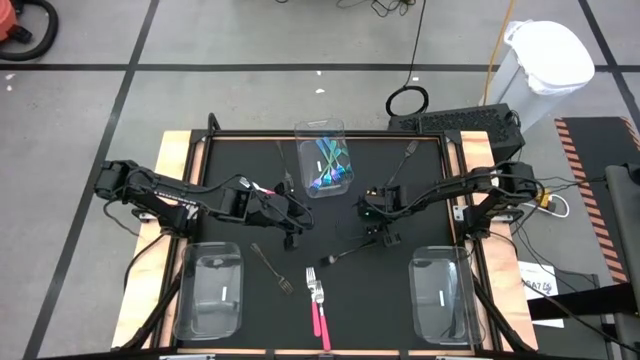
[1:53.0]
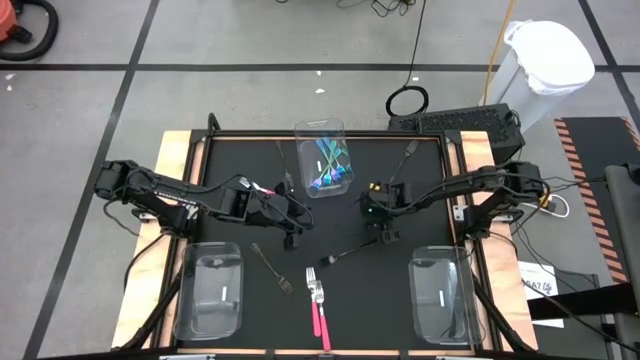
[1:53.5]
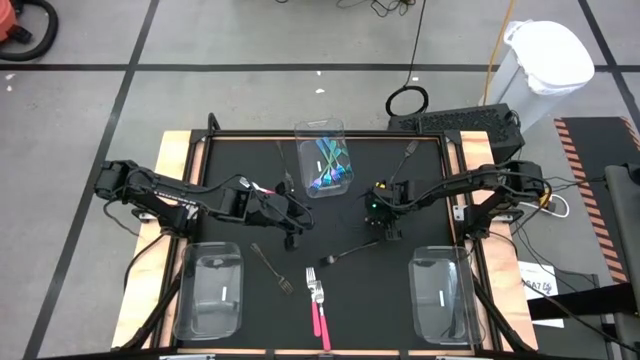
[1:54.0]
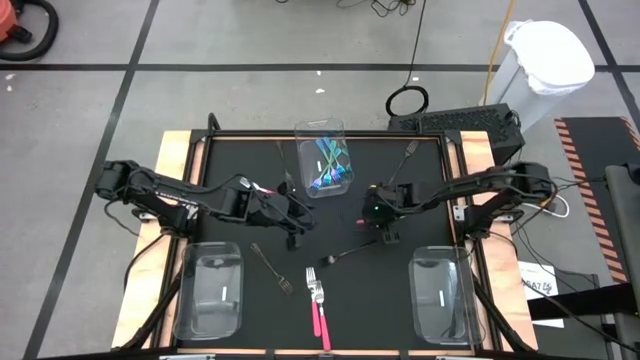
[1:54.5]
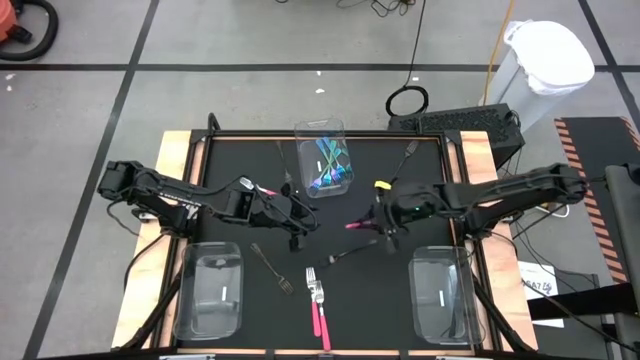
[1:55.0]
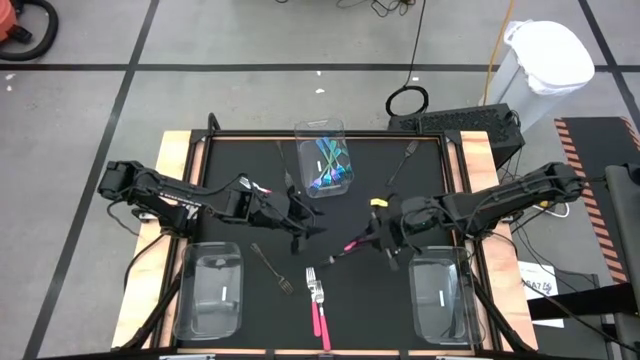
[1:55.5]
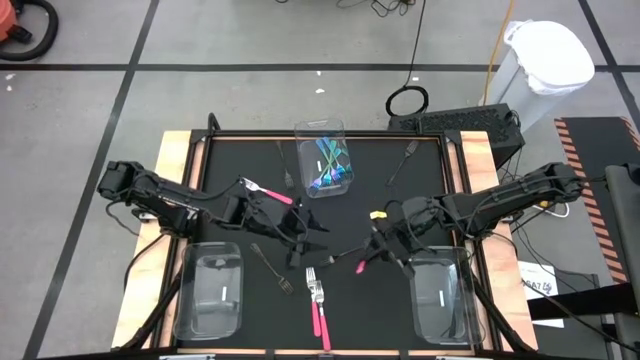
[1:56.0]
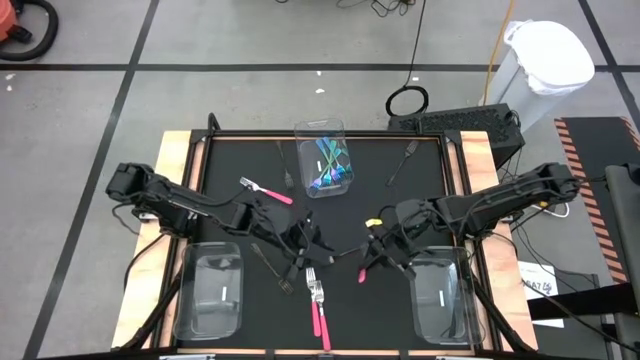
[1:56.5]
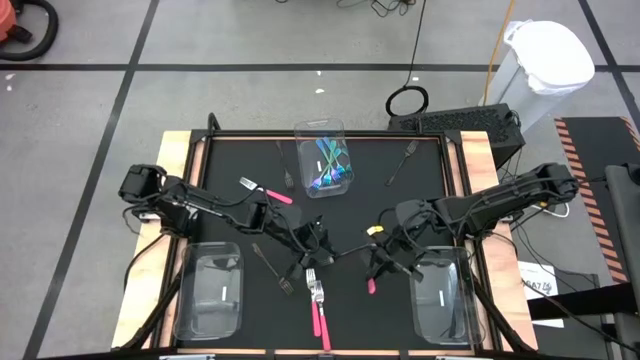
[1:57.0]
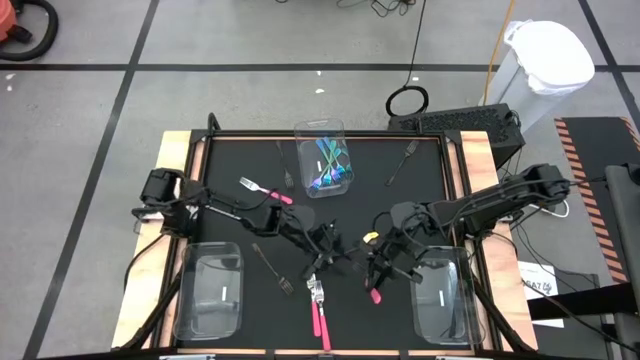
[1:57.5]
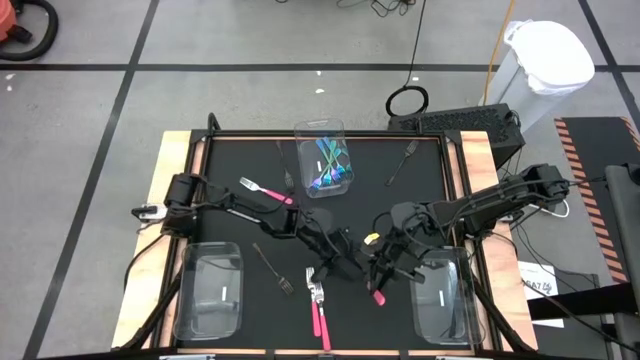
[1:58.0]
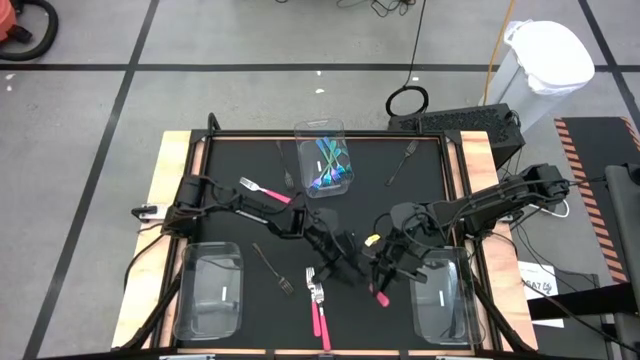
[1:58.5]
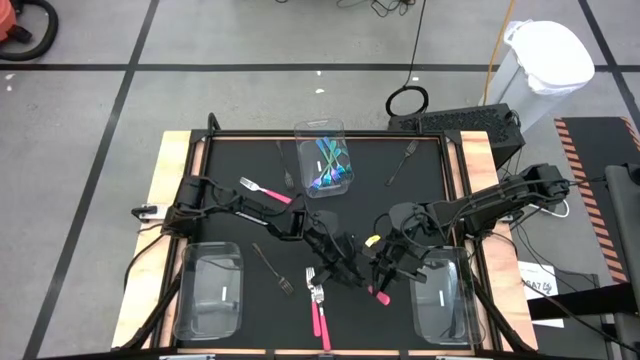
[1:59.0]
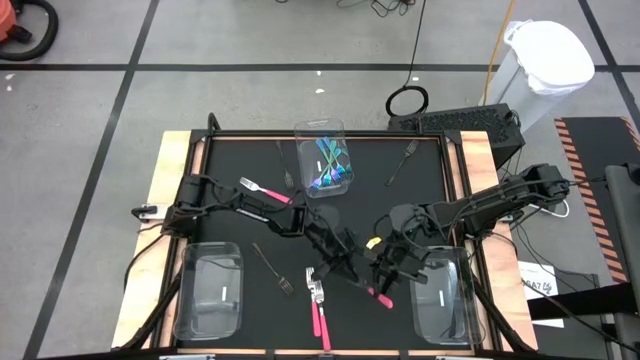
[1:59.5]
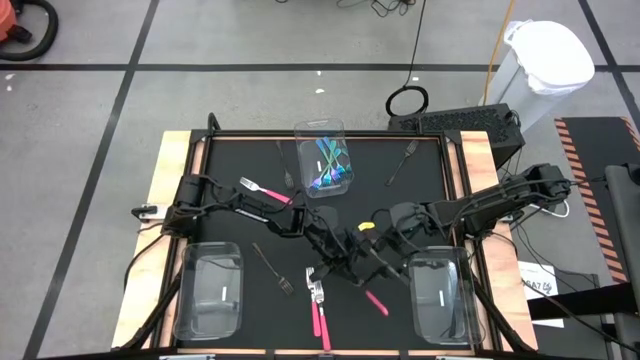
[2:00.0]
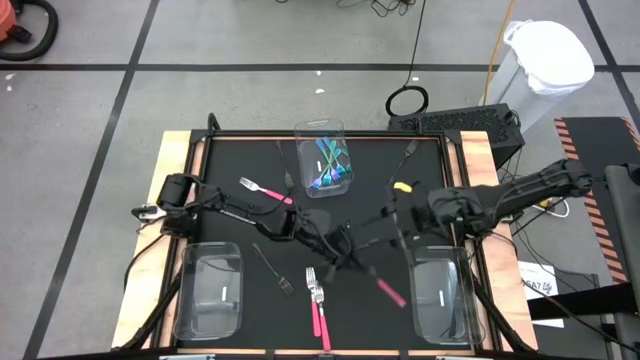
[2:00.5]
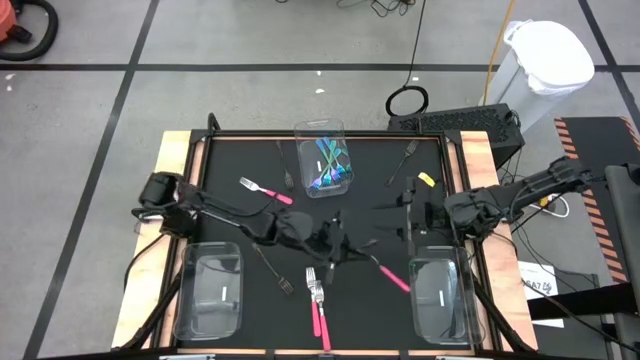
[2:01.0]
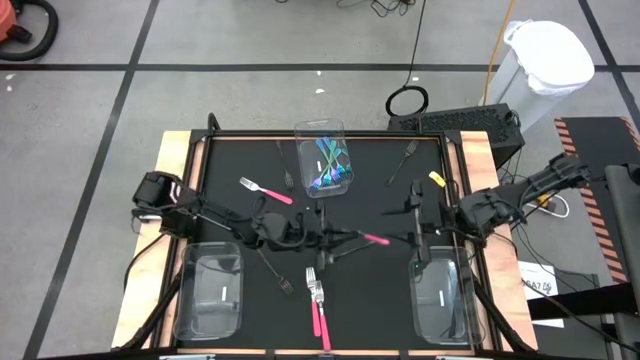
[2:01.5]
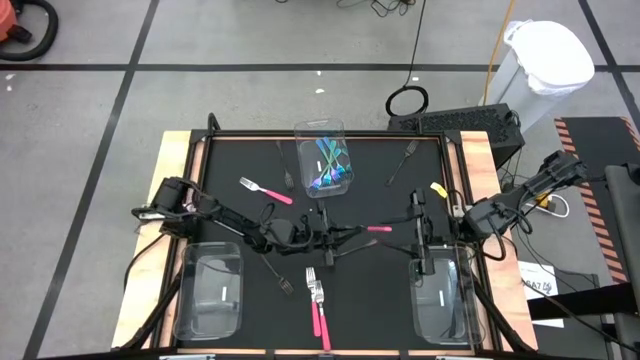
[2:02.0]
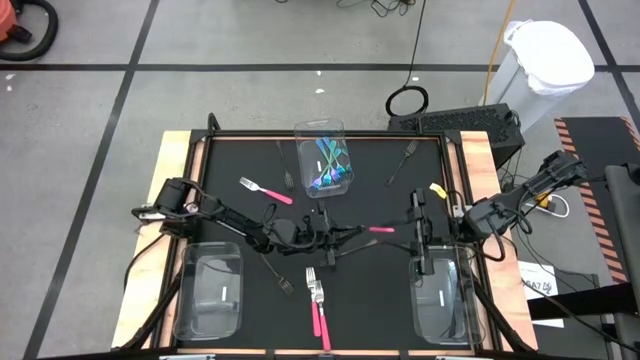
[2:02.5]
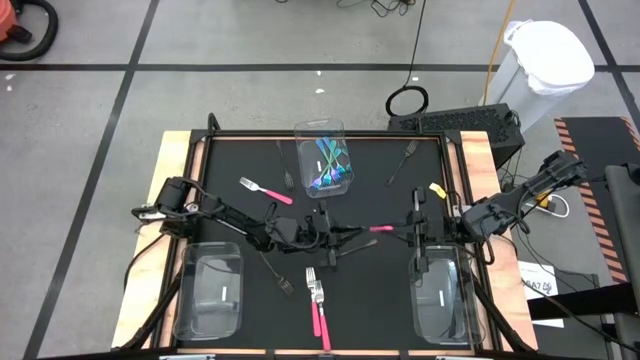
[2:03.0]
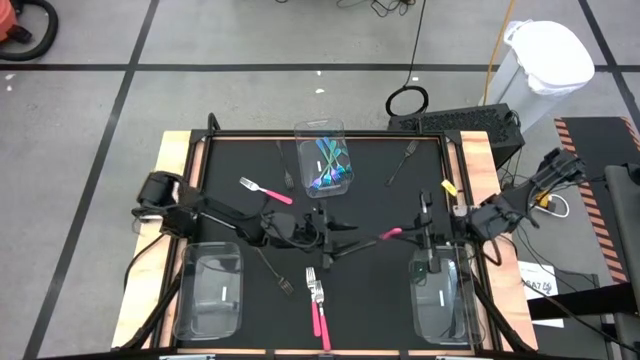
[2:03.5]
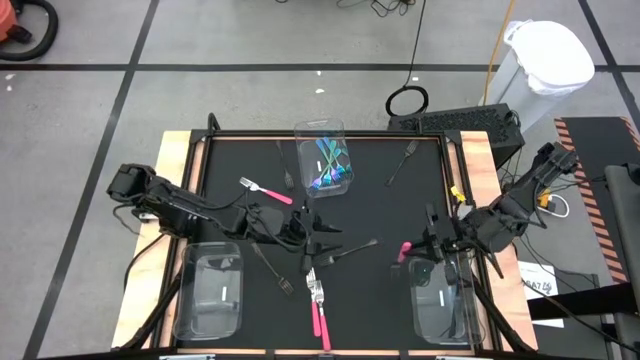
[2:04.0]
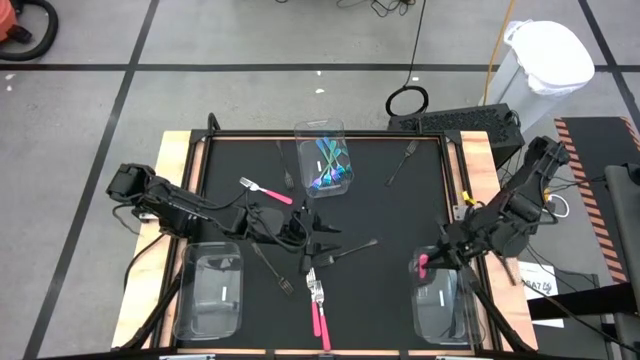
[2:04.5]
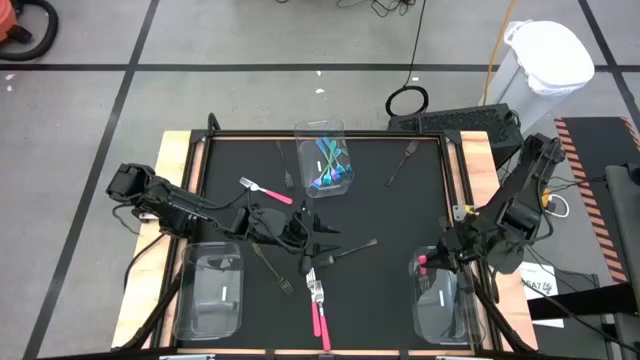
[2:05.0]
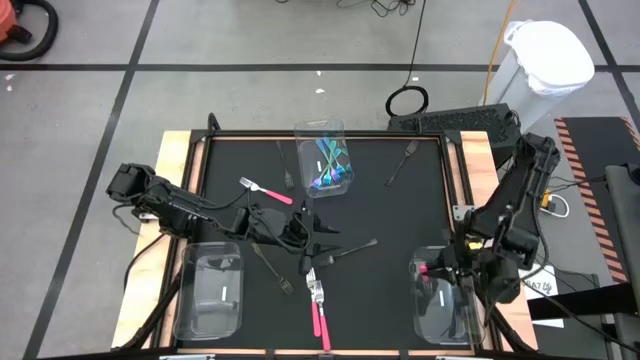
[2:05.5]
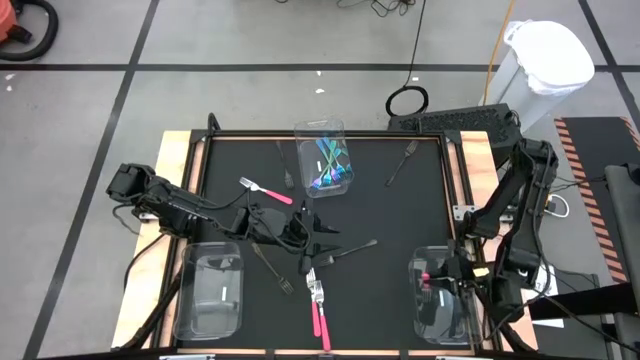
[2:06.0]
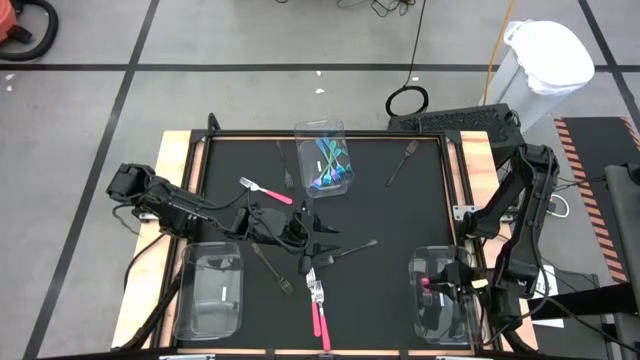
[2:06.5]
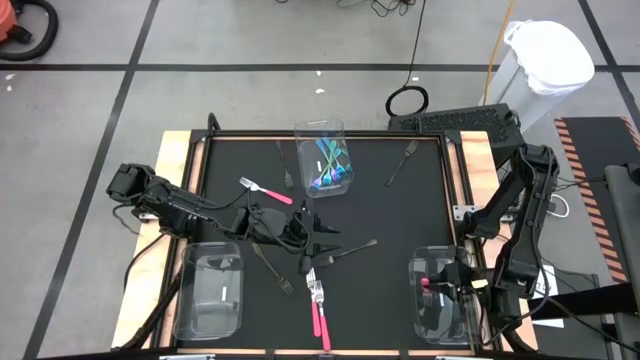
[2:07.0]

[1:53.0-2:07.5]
Task: Sort silverware by color (type)
Put the pink fork into the bottom right transparent bin

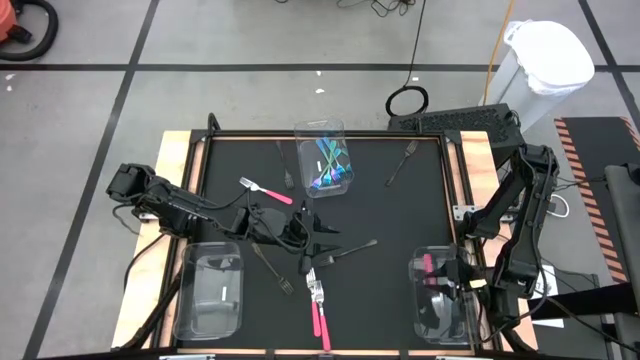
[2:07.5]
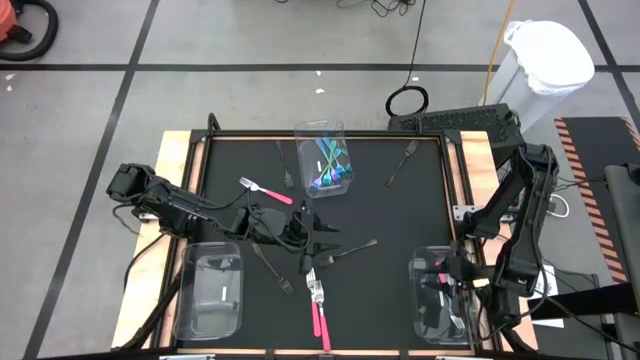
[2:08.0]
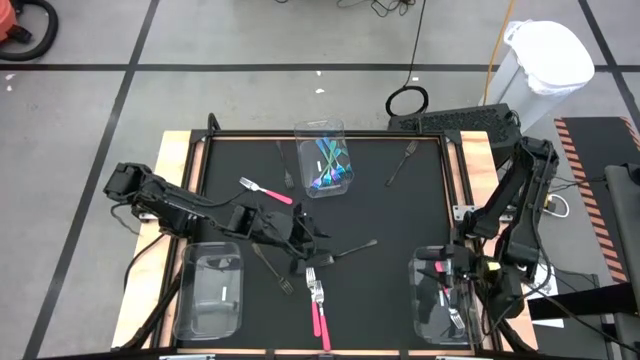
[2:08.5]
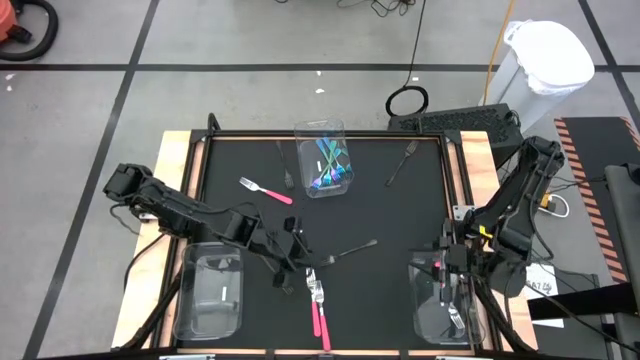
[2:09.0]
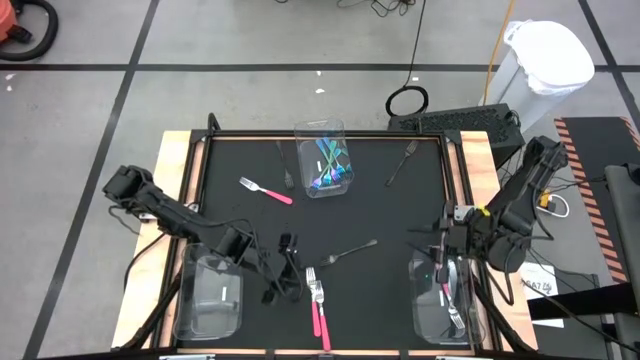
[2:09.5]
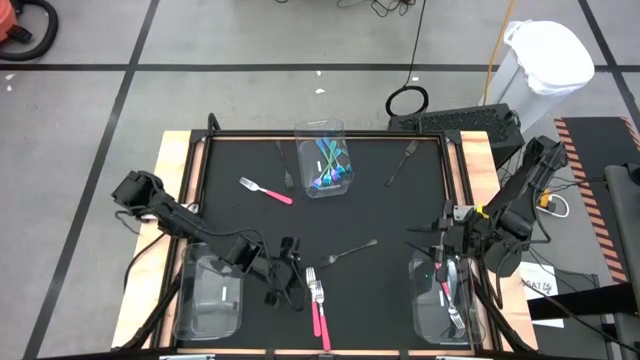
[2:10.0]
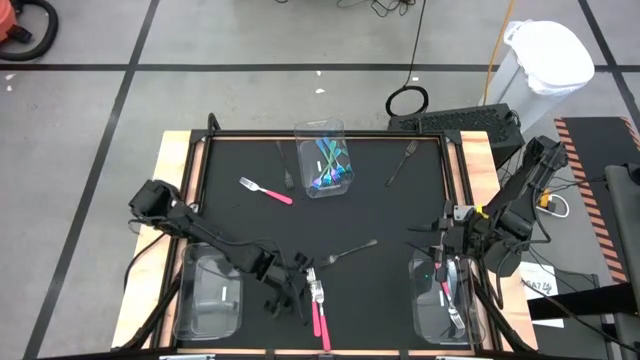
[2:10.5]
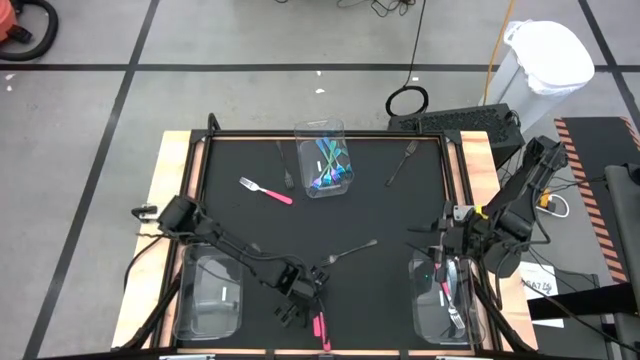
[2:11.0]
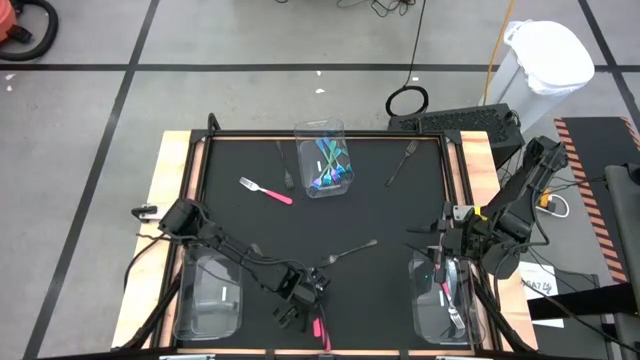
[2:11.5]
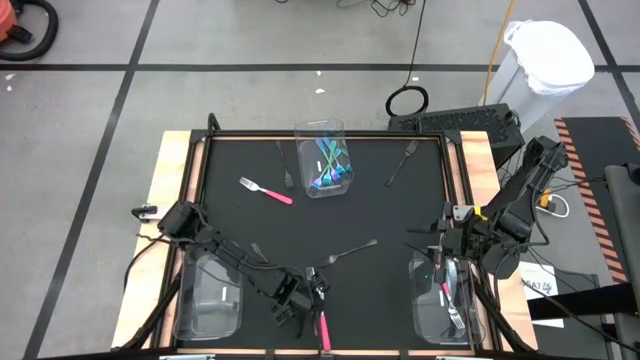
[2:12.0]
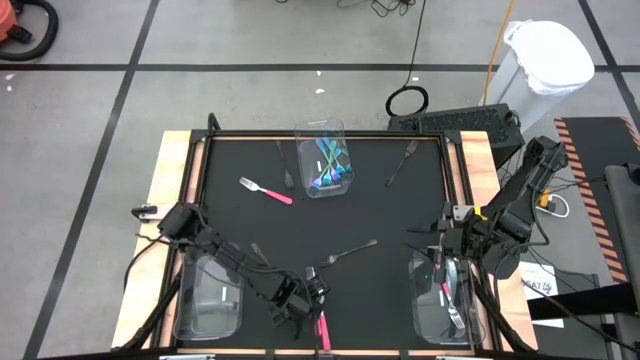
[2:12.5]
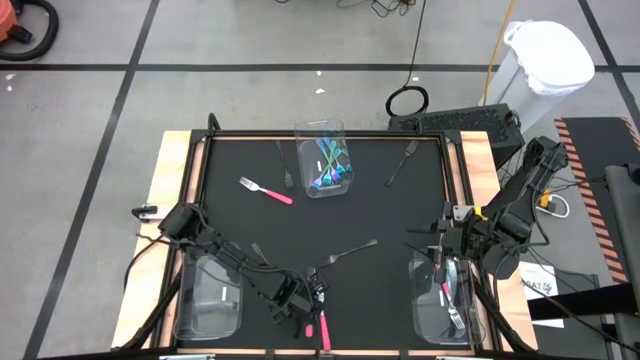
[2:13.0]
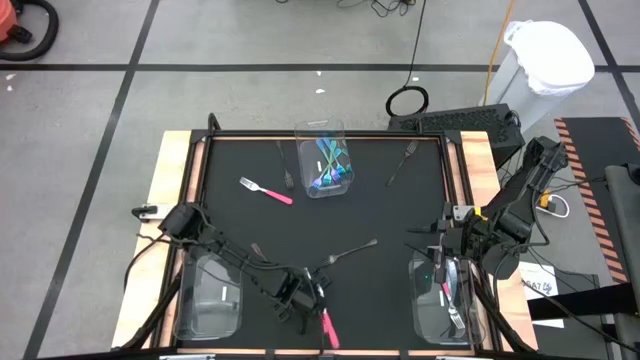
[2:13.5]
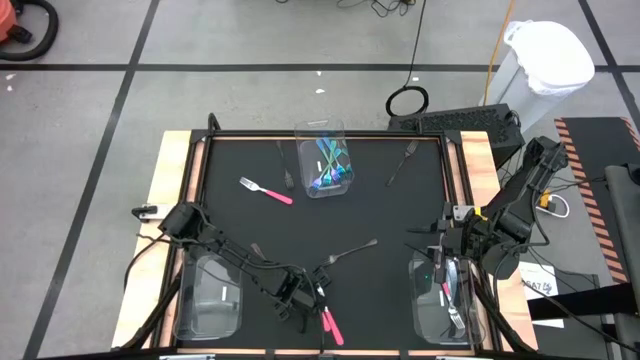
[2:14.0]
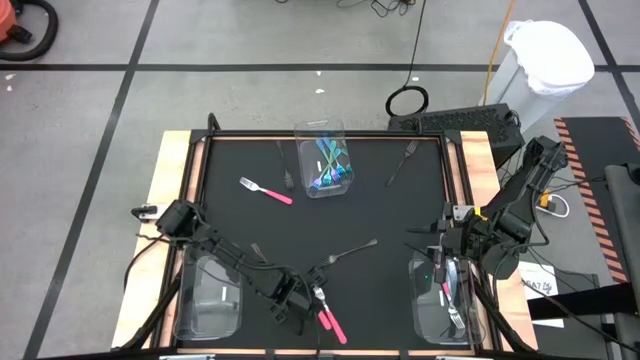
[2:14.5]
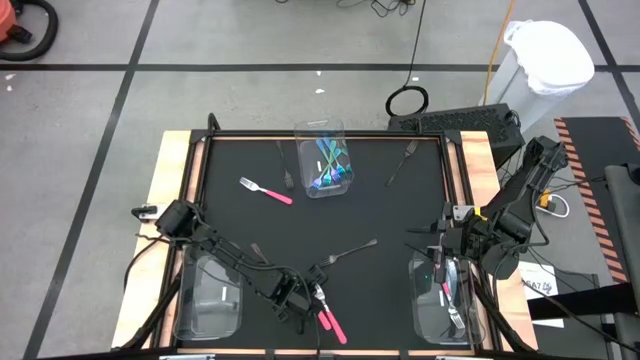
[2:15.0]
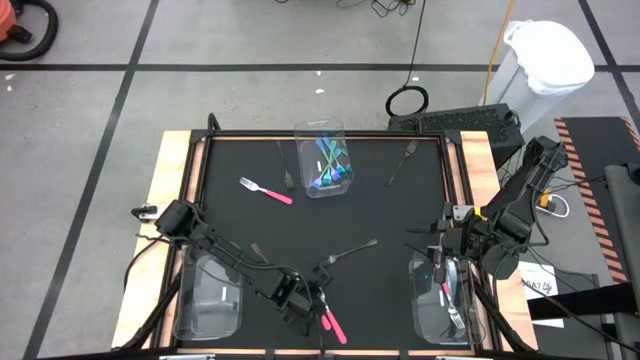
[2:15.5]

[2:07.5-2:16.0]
Put the pink fork into the bottom right transparent bin
